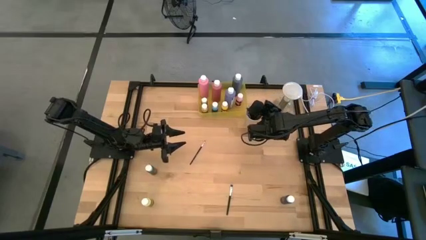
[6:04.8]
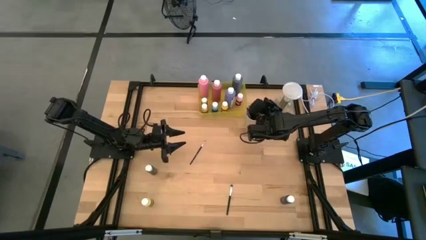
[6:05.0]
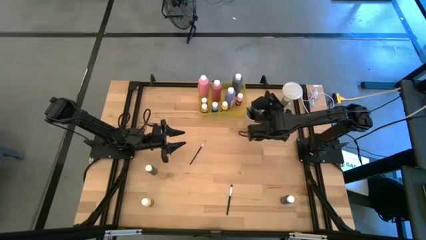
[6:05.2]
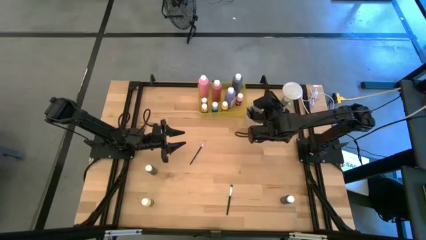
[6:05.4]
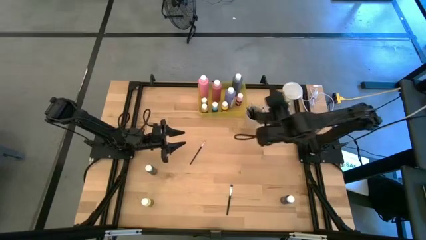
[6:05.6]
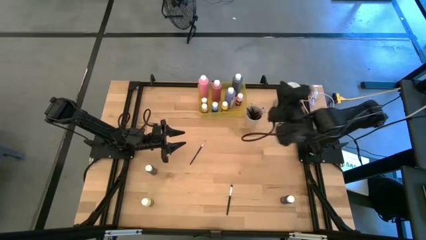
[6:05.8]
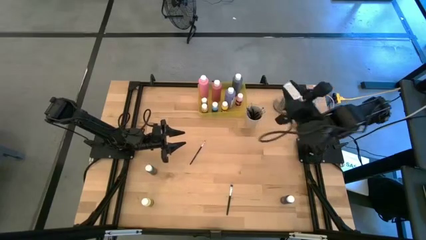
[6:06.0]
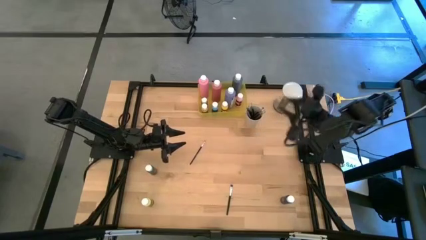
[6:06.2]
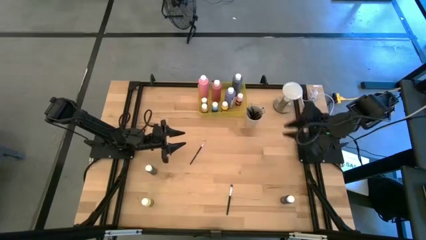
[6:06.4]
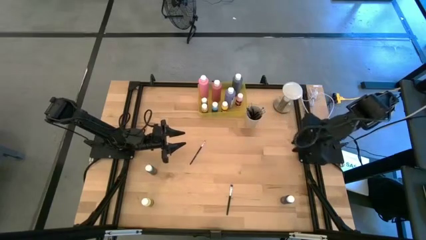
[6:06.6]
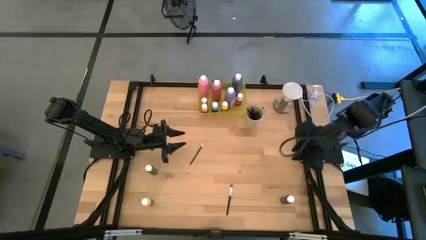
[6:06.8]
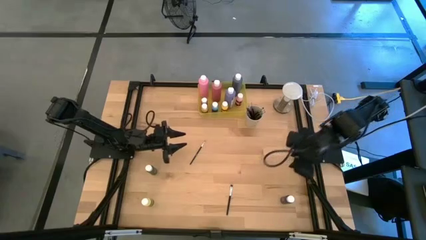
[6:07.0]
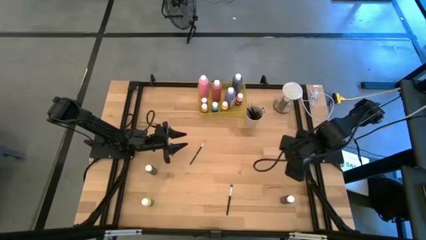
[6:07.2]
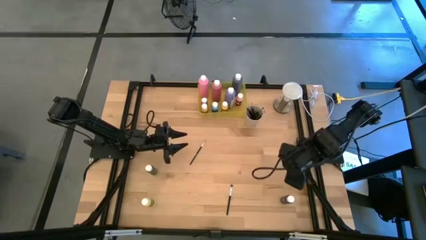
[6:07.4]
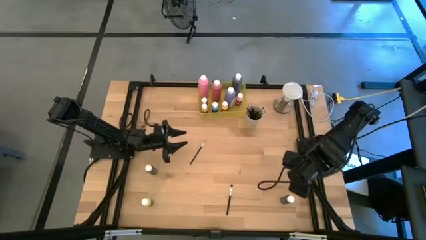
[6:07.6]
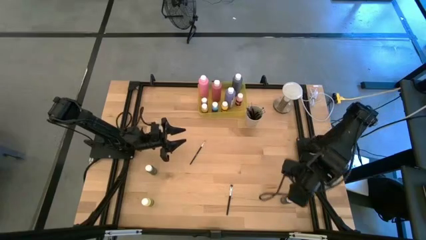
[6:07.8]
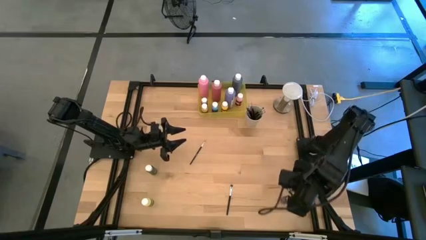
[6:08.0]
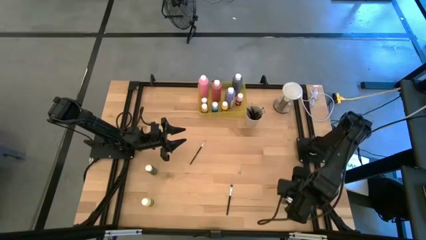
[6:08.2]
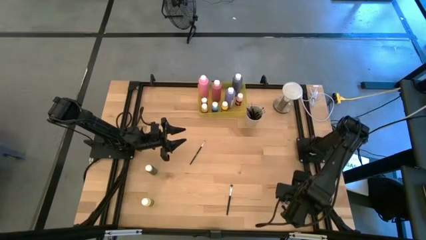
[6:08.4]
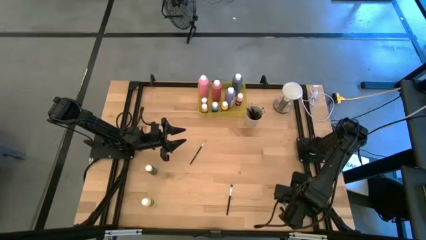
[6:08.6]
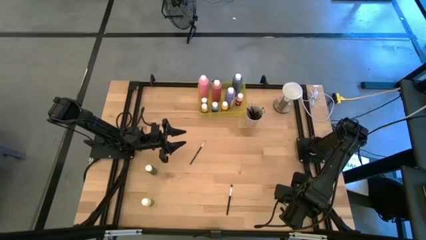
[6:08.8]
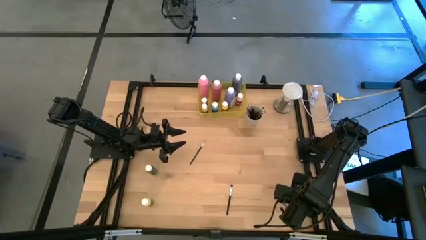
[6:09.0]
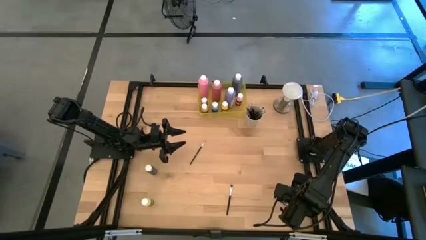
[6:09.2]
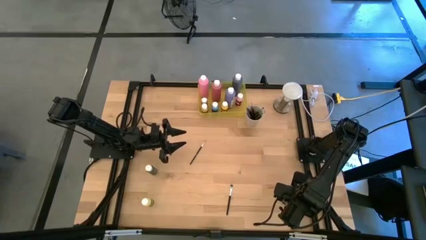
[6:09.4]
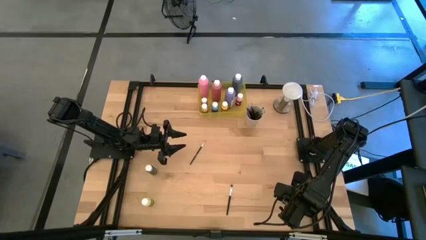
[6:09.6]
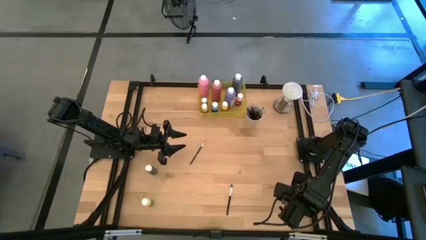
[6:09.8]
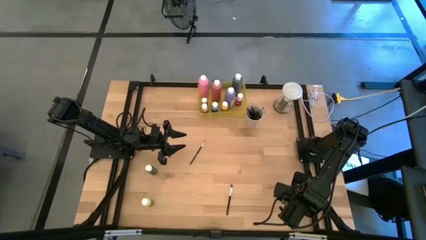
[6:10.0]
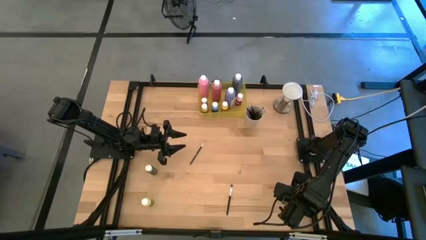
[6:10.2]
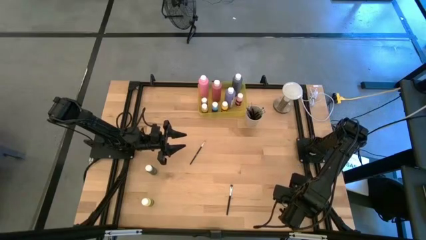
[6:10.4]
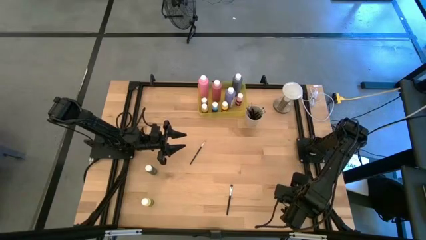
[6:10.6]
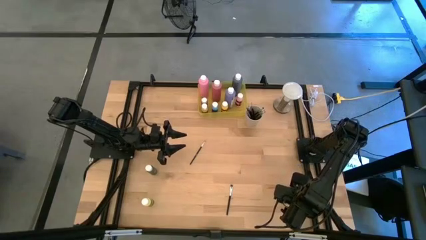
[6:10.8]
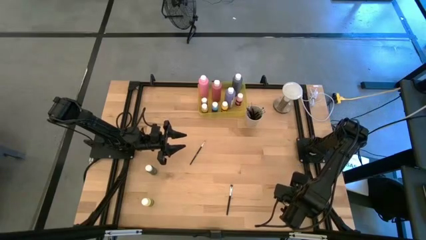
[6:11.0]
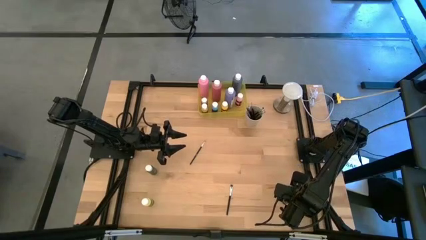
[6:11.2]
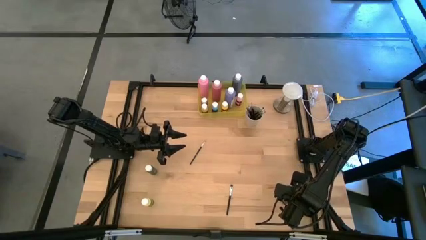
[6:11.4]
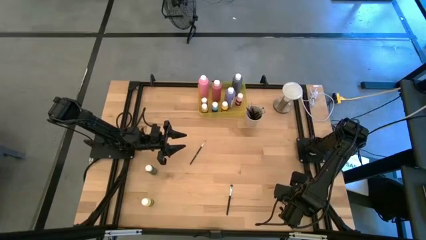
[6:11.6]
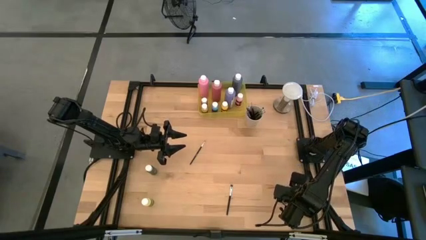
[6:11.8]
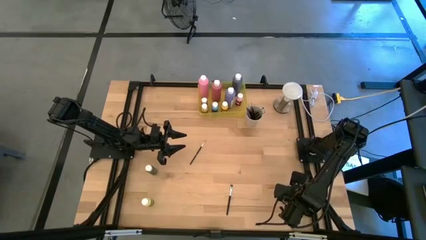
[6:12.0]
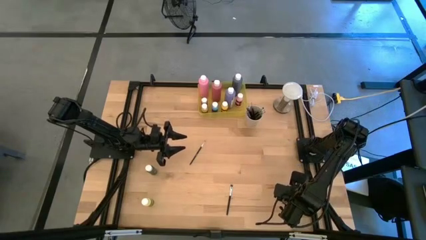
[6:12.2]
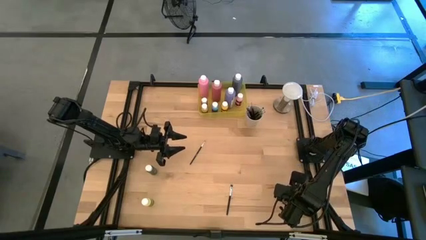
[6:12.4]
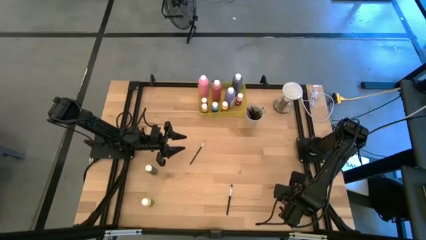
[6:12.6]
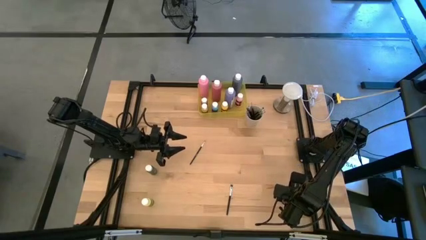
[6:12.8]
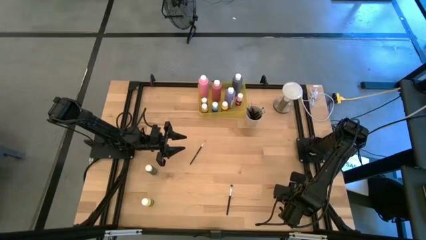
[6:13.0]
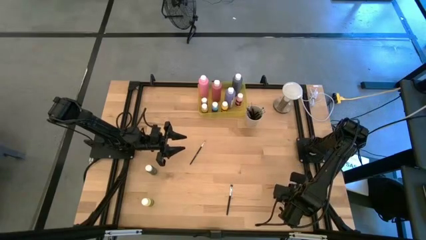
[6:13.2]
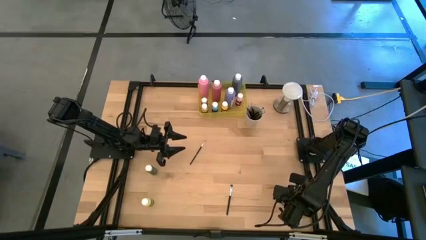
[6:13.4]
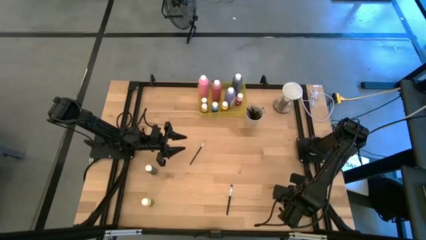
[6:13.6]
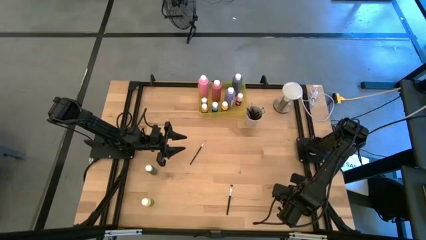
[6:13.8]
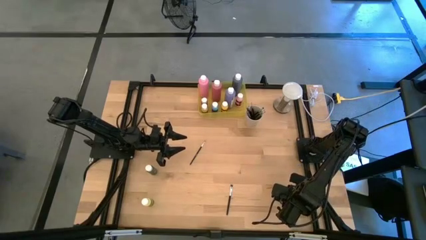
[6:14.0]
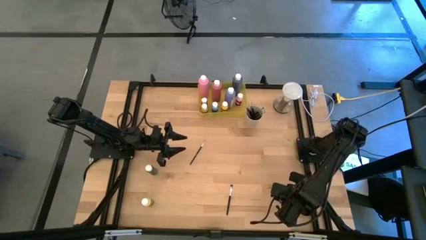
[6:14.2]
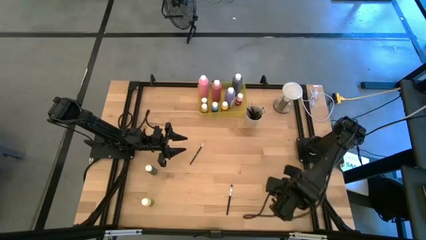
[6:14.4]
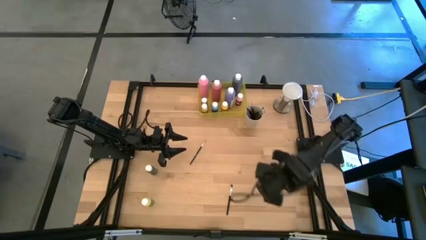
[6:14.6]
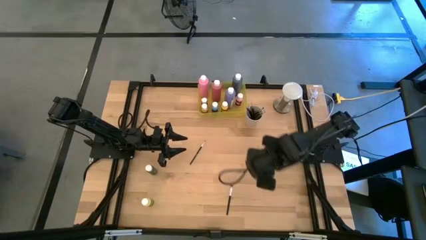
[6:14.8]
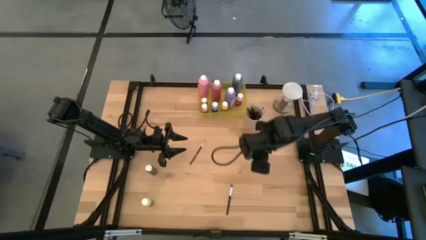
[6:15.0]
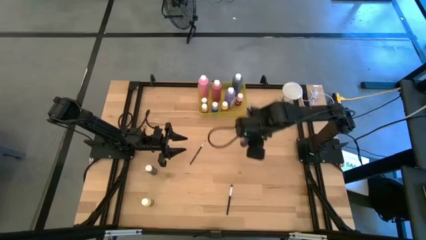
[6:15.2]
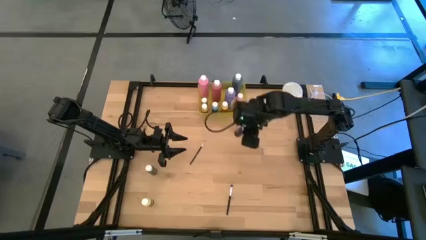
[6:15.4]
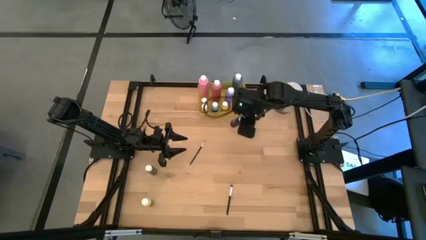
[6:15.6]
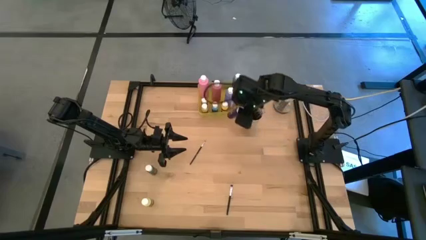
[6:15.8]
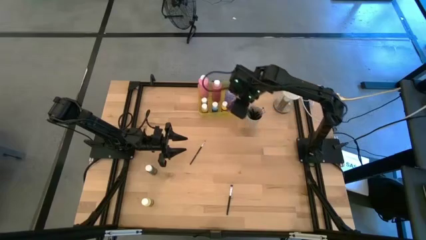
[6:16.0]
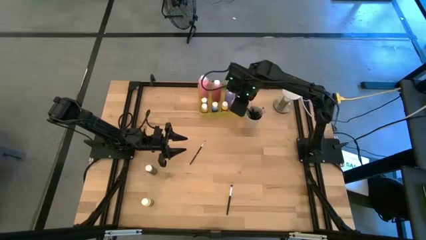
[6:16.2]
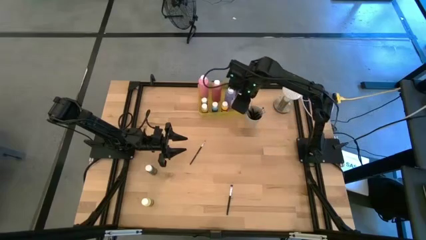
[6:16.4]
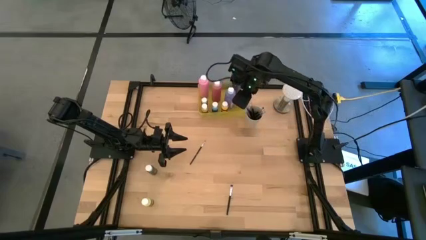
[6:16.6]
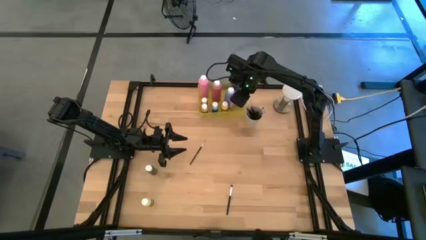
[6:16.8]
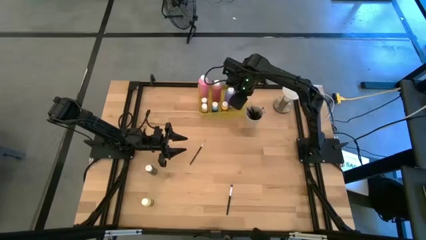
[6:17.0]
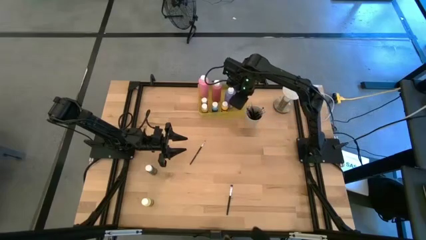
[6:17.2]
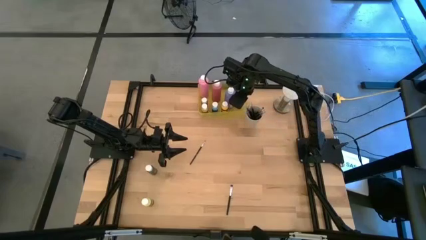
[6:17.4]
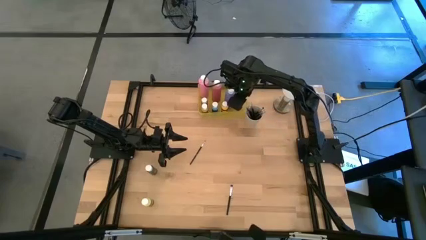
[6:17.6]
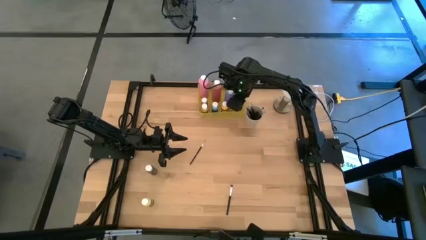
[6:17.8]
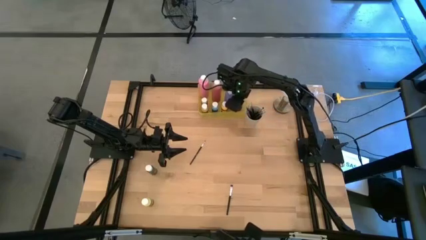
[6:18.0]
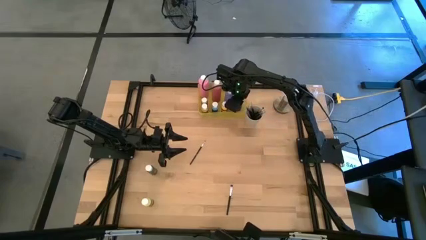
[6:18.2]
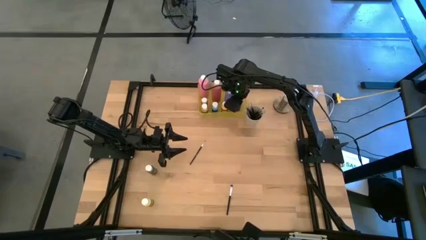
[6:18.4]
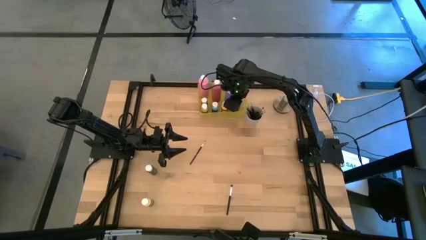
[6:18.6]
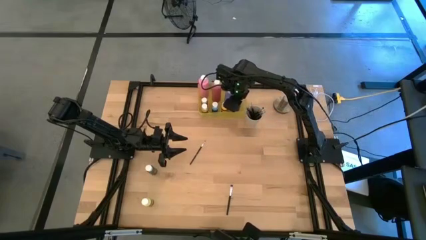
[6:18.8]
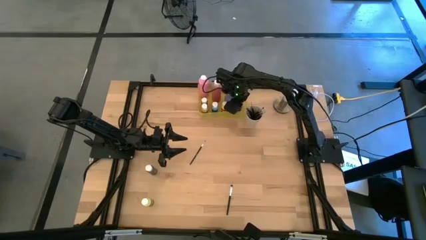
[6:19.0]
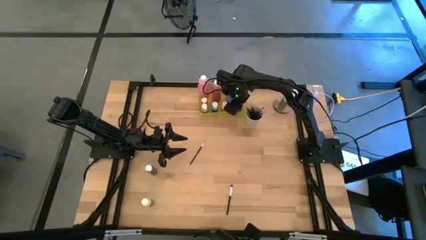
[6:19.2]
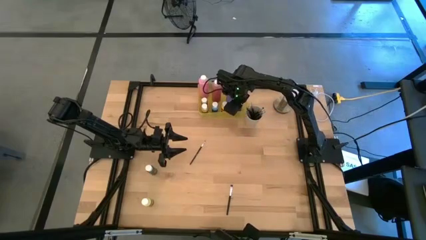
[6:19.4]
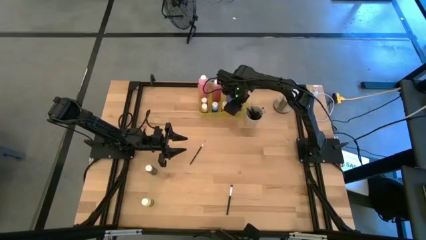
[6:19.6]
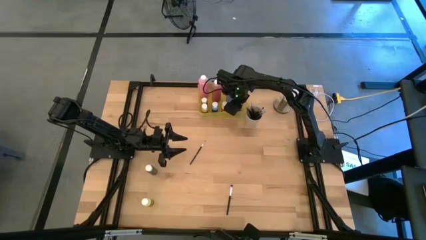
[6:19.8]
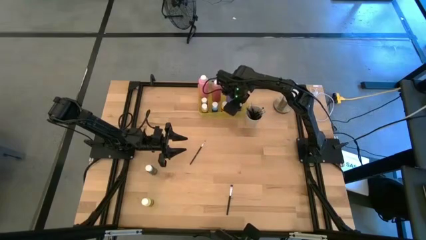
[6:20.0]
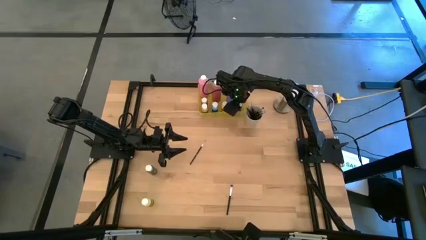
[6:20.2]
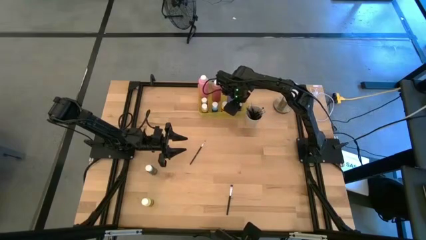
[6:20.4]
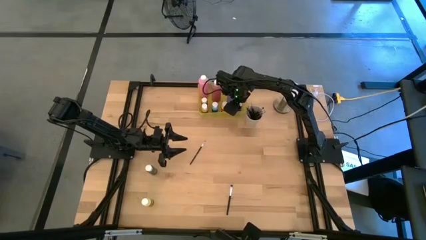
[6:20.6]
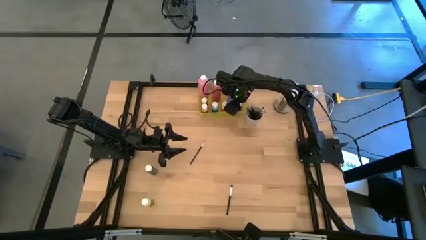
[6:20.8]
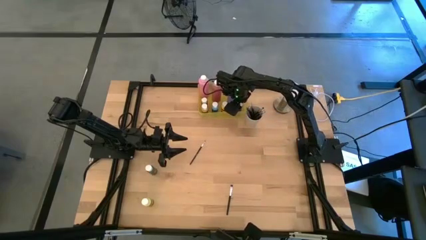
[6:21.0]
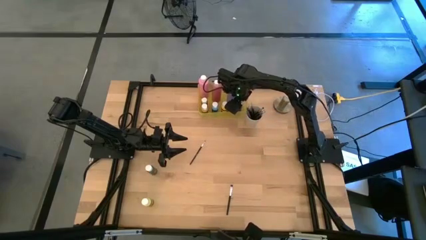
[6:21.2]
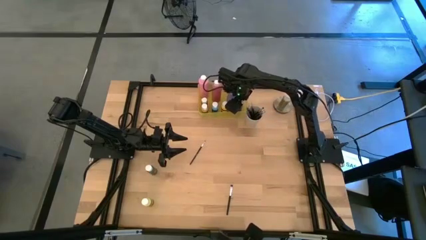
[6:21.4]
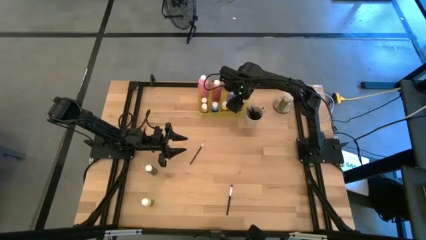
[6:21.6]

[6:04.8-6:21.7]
Task: Pick & Place Paint Supplies
Put the small blue paint bottle into the yellow bin
